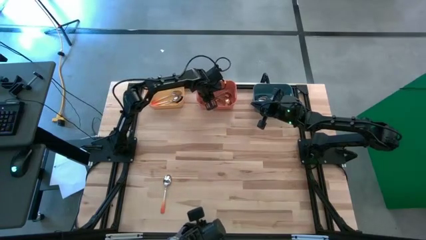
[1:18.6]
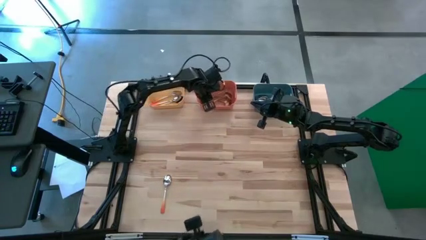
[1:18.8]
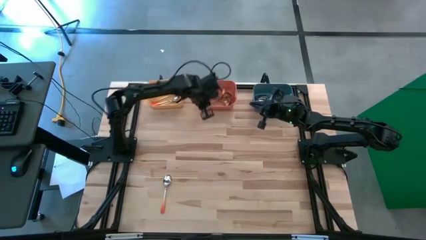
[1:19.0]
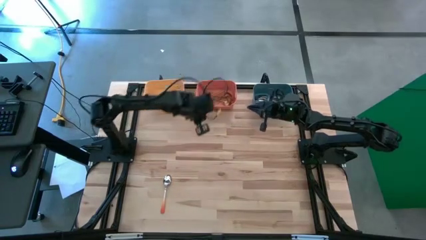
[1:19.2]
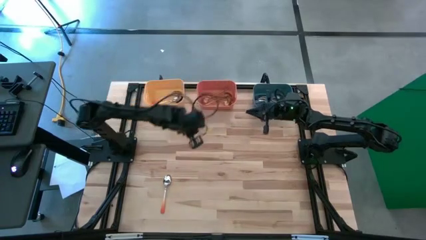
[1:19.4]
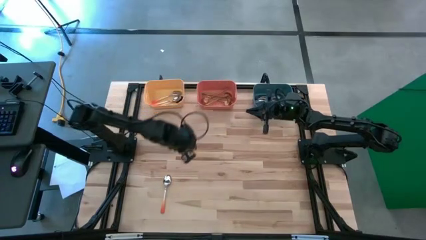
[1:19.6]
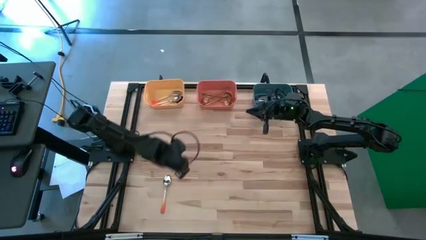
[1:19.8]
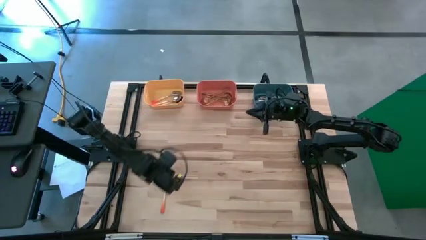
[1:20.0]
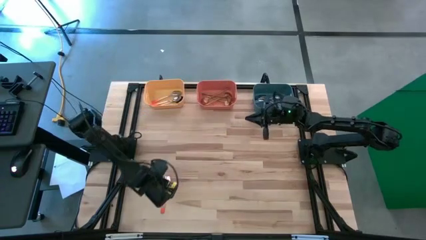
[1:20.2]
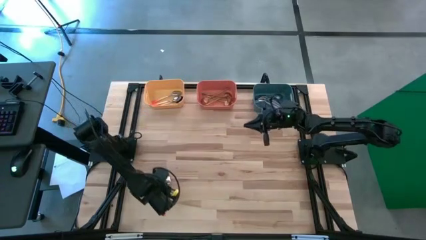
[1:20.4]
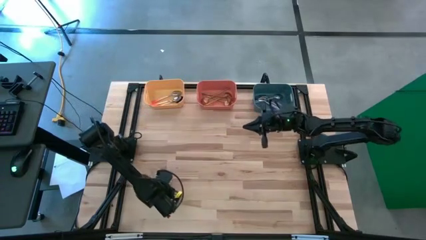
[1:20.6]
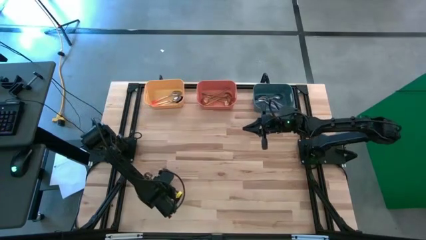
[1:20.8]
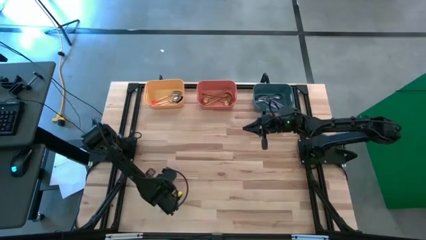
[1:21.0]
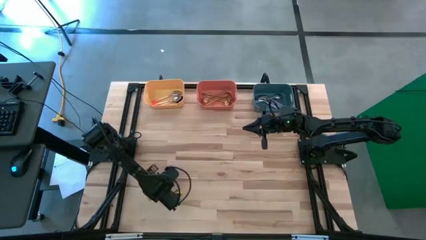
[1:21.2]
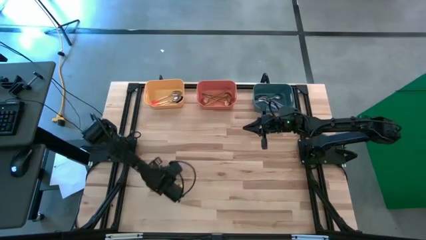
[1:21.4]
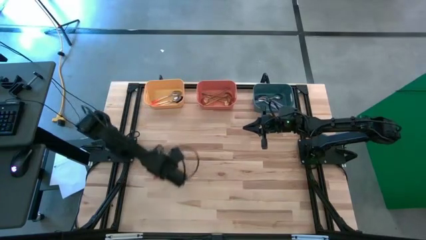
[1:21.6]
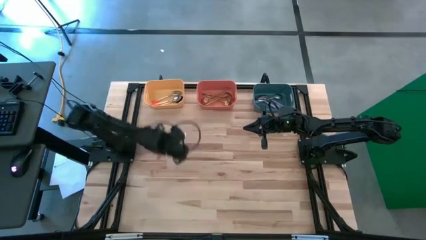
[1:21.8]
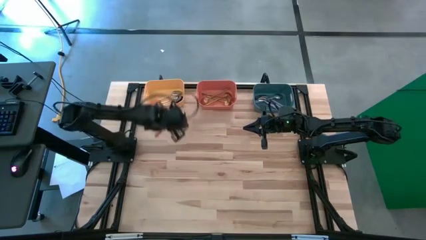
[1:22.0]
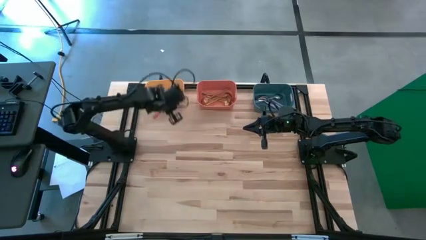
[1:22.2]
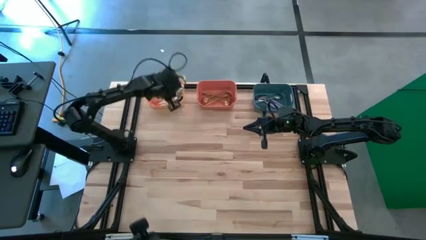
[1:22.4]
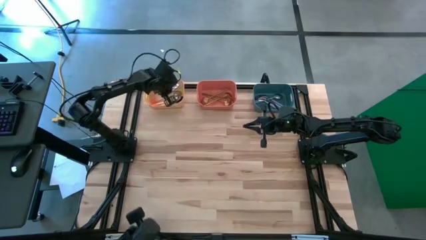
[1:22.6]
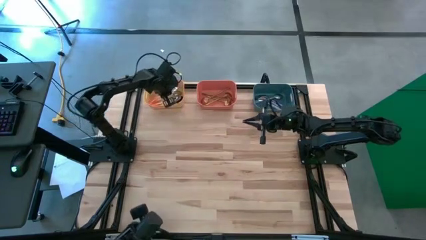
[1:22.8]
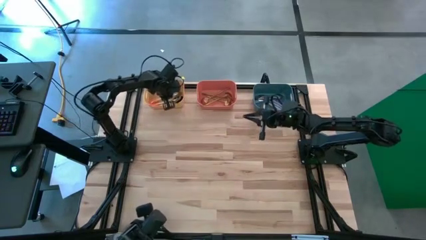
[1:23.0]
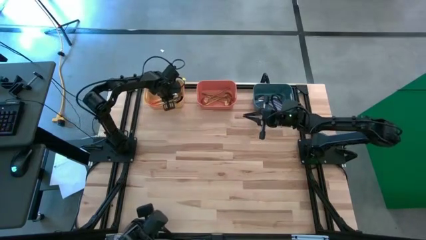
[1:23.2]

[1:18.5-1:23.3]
Task: Sort silverware by color (type)
Put the orange spoon into the yellow bin

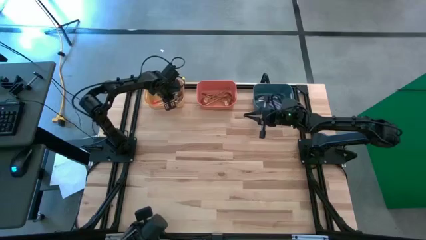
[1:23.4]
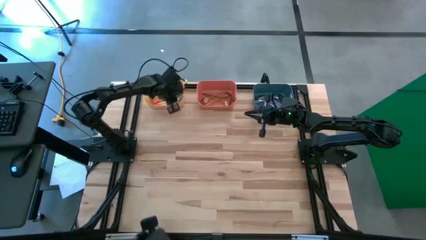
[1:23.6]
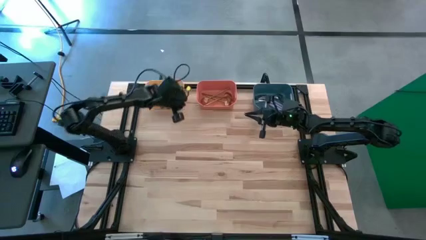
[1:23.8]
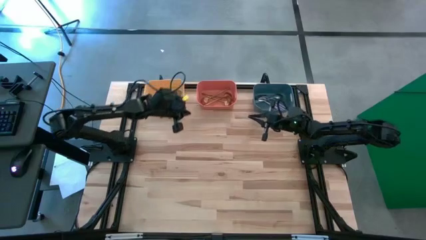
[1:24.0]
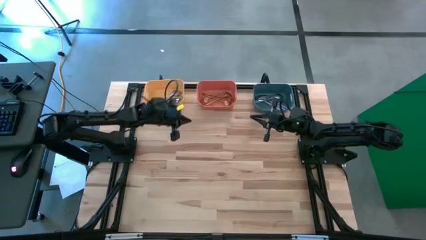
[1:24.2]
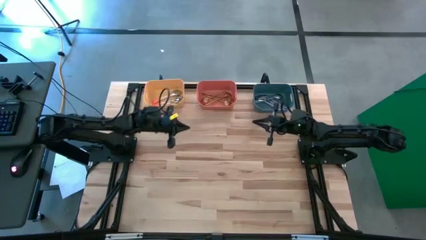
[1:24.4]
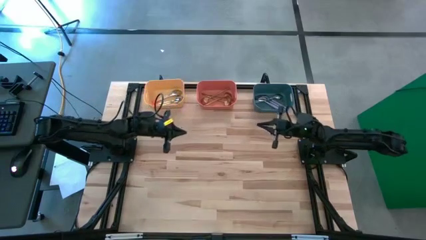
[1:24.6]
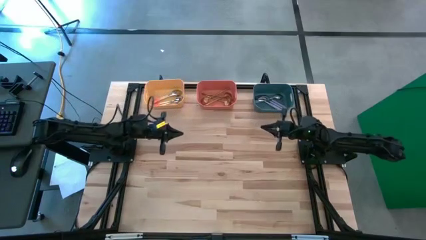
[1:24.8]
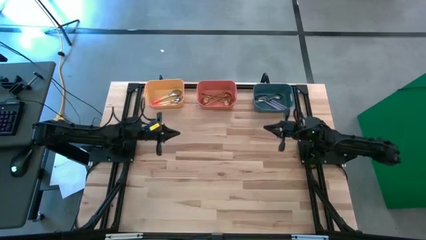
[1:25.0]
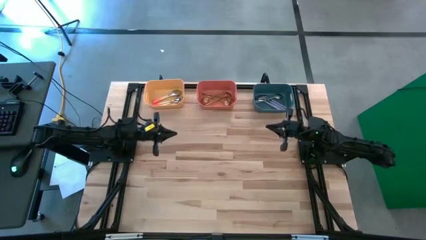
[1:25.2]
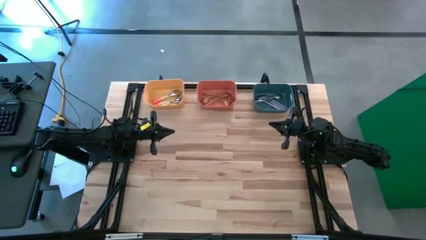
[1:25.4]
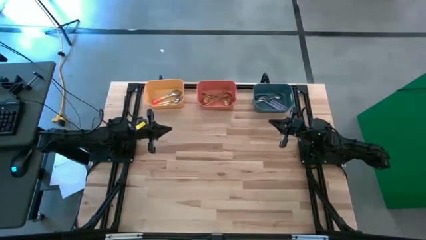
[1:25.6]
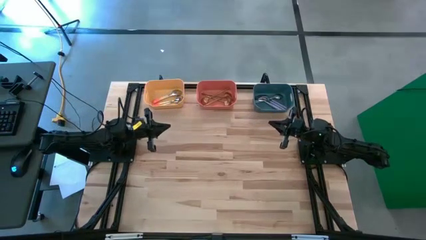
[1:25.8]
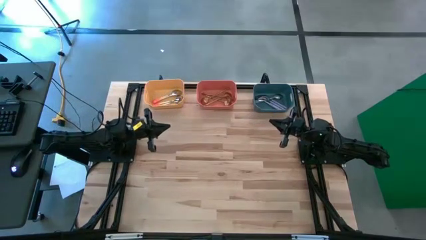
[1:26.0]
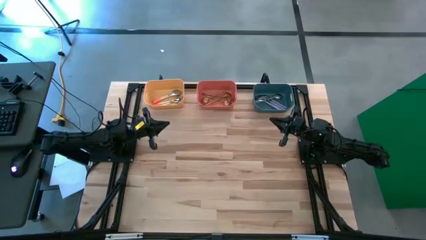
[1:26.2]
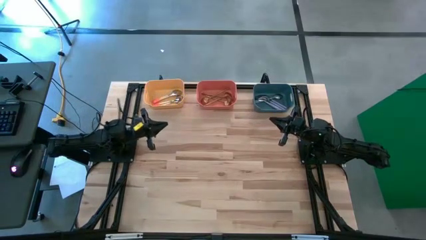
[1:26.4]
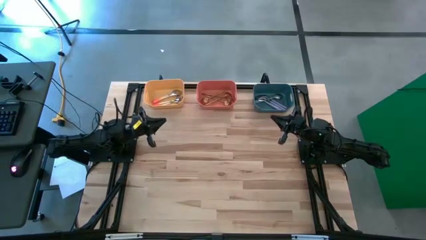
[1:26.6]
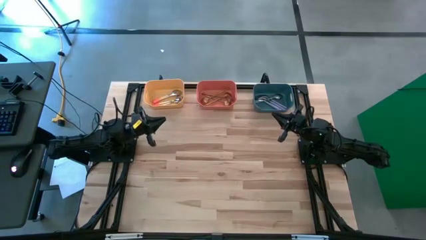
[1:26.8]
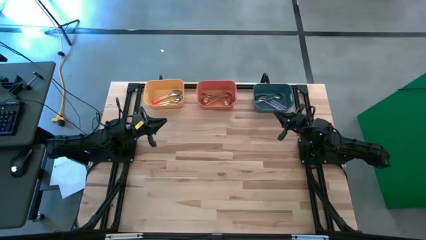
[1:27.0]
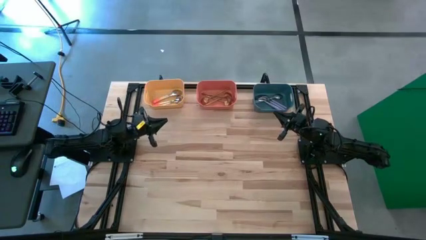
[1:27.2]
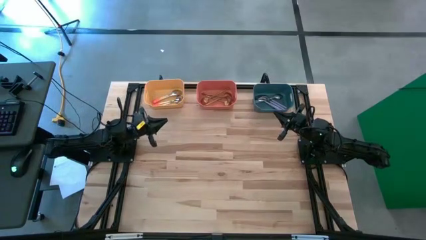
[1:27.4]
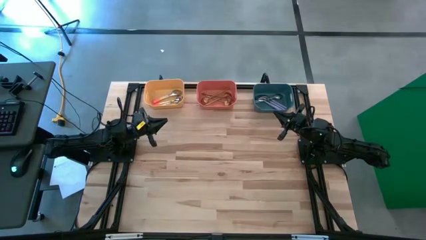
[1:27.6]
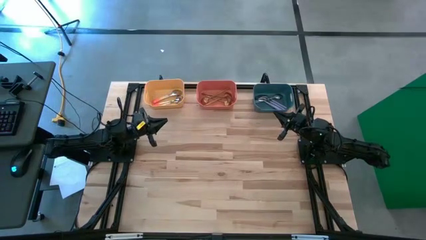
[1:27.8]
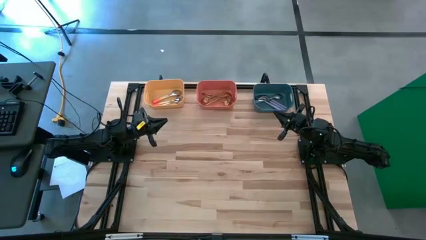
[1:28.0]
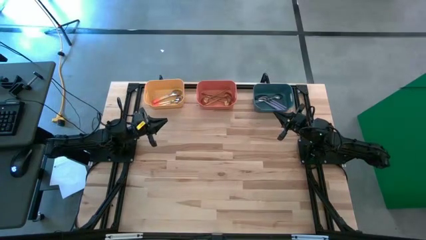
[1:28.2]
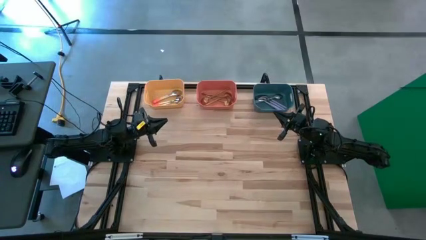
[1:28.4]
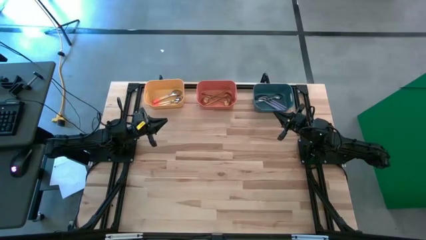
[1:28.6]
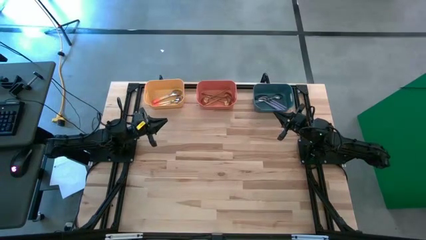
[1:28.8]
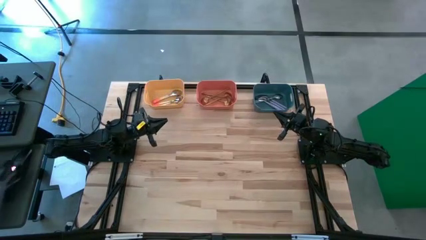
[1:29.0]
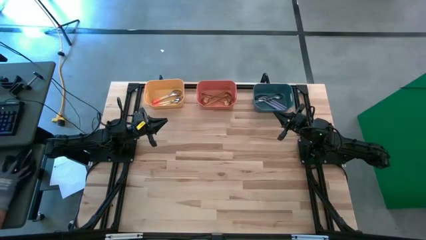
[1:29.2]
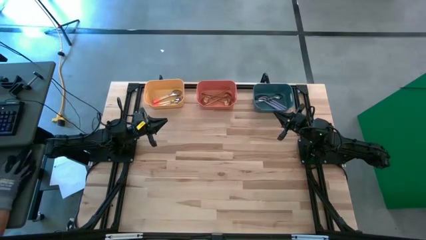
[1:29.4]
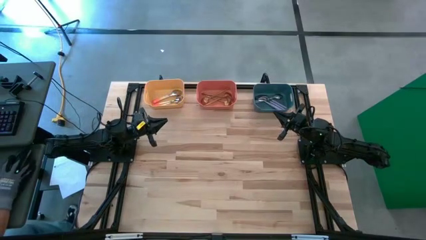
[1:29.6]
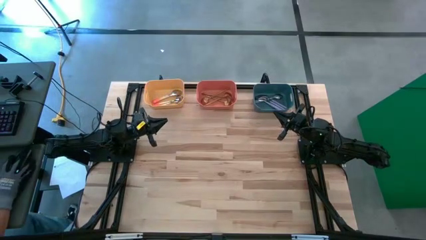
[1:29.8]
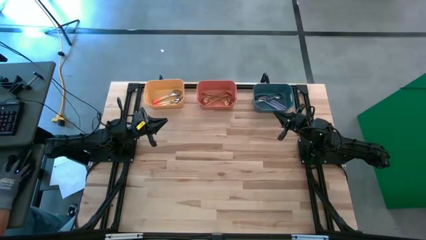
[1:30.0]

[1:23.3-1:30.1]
Return to Home Position

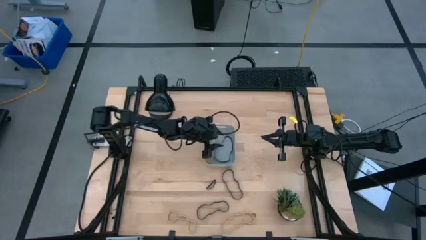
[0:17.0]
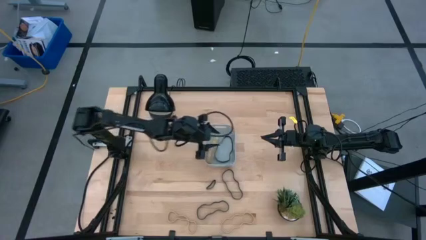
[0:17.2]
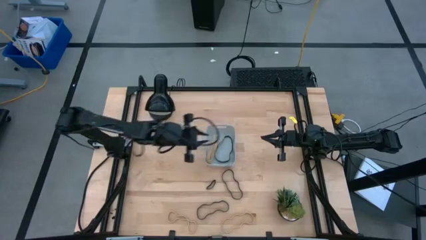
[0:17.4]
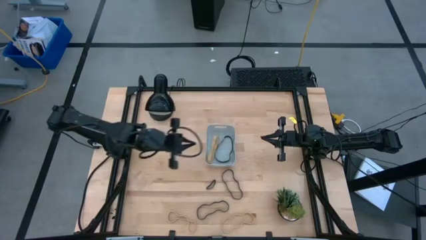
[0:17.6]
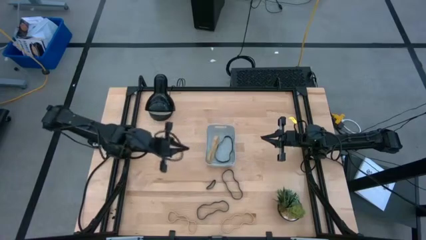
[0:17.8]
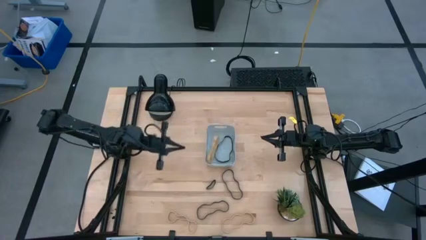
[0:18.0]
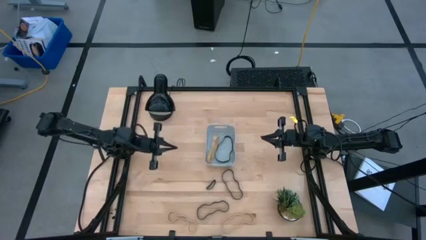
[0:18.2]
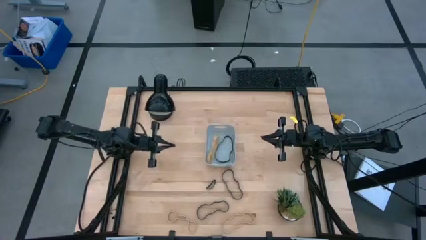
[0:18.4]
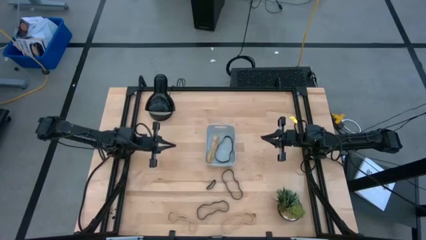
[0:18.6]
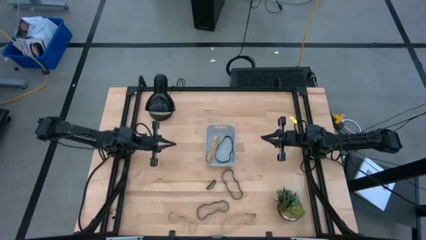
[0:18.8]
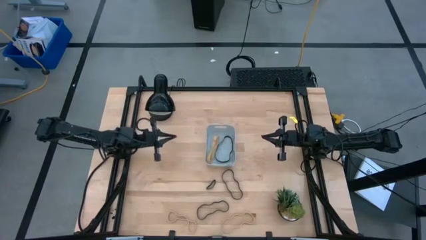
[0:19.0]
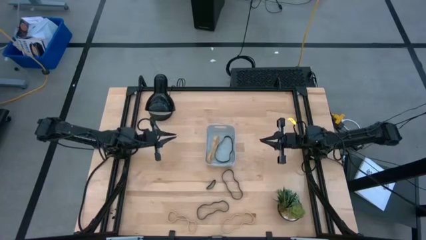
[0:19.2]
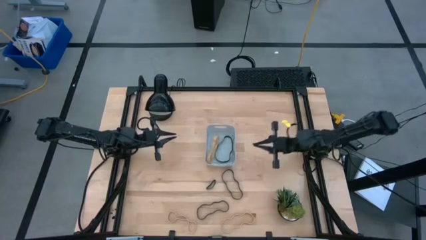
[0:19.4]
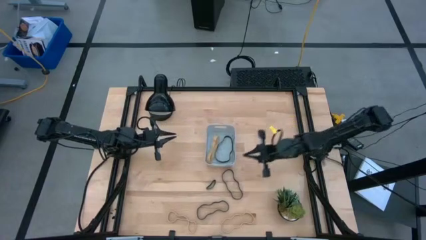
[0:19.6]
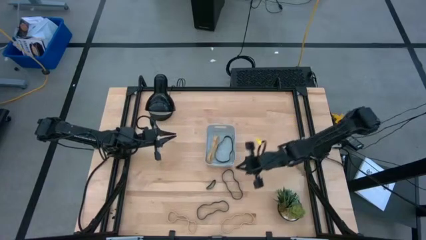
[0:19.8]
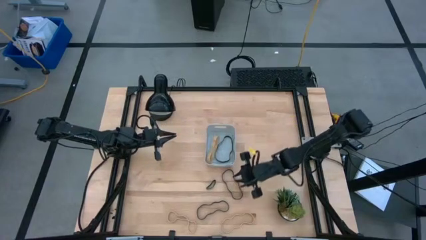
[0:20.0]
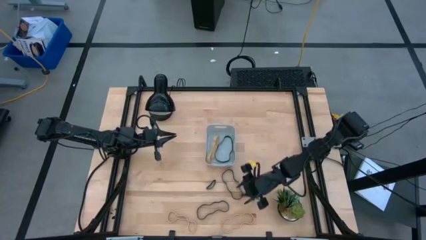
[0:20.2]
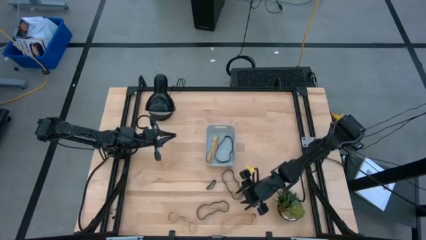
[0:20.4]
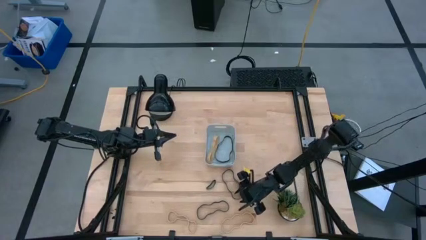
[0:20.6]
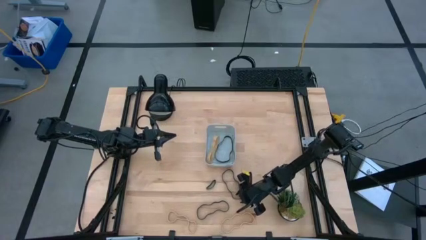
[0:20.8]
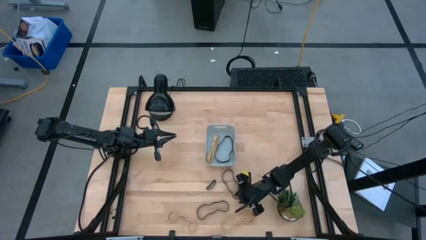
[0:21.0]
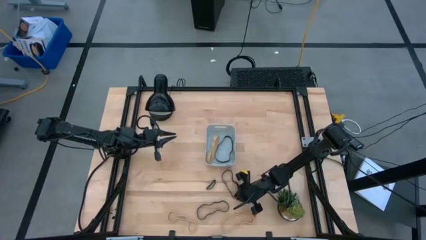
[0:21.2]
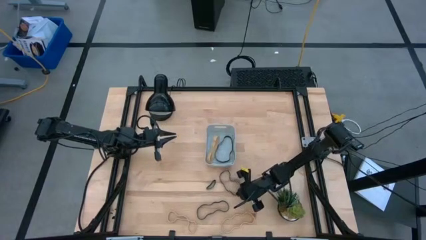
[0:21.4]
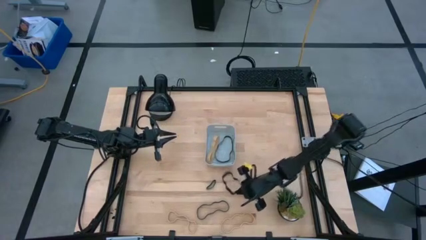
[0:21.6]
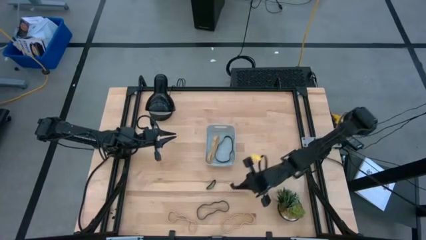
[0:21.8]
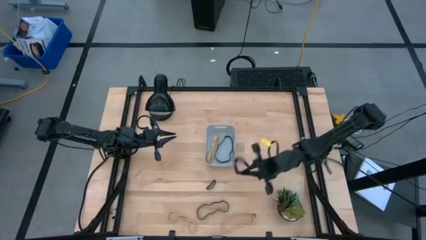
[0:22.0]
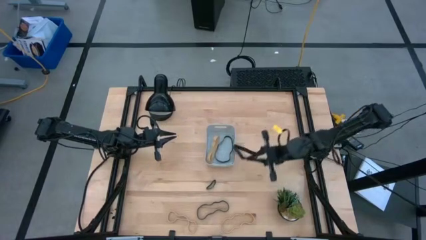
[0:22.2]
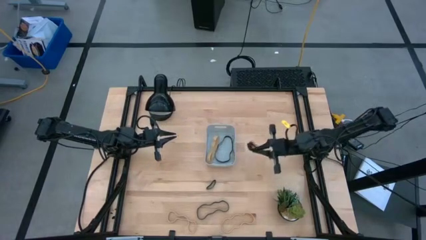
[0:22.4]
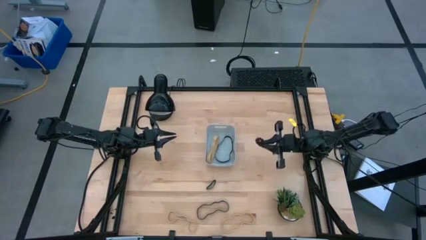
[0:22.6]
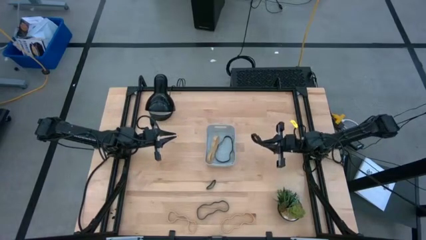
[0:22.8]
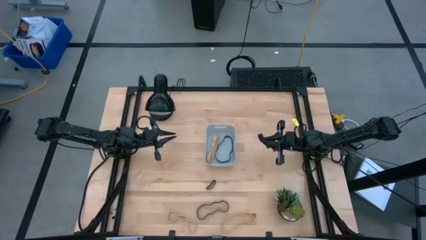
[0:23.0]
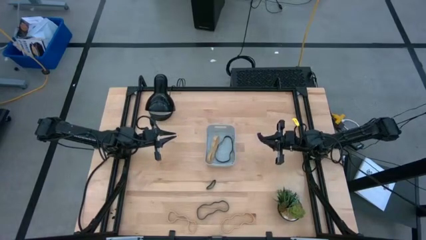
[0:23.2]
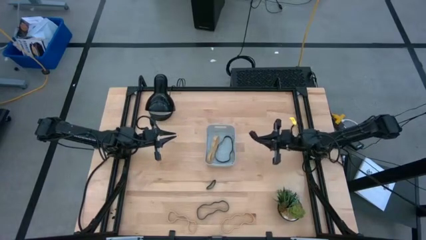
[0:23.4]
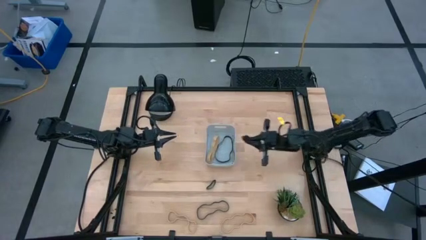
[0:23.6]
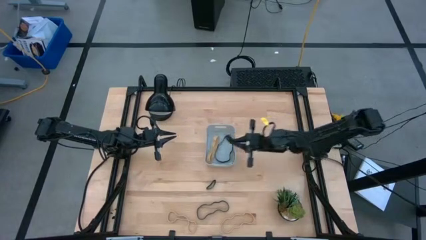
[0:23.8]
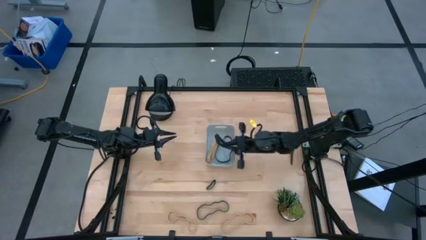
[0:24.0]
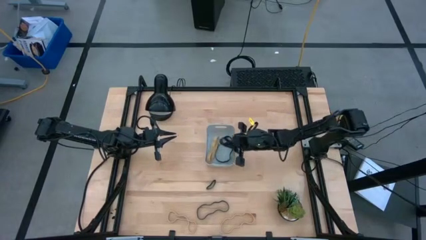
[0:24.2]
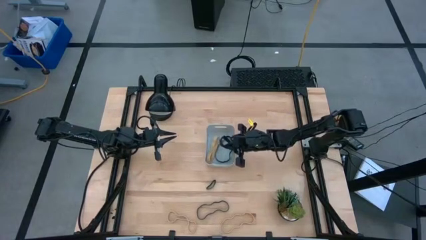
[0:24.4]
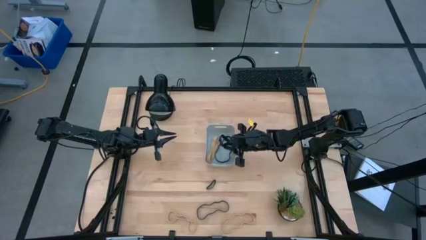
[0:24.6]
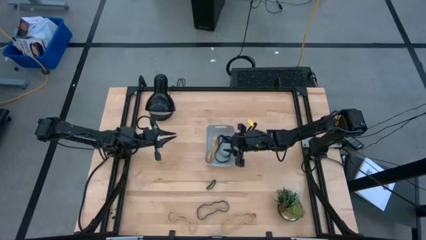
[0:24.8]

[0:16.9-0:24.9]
Task: Pick and place rubber bands into bin
Put the right large black rubber band into the gray bin
